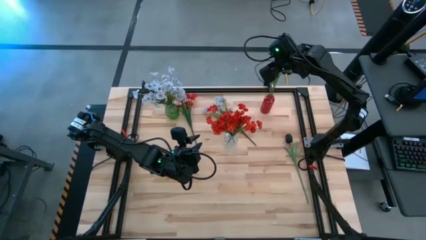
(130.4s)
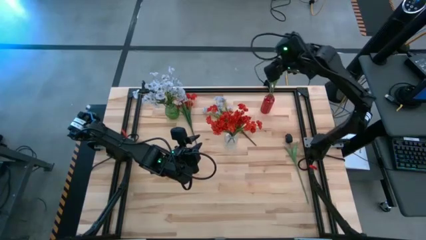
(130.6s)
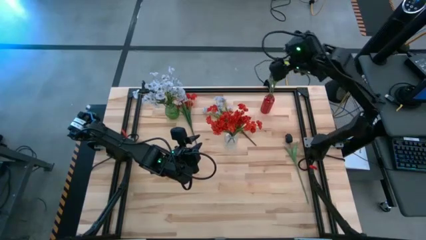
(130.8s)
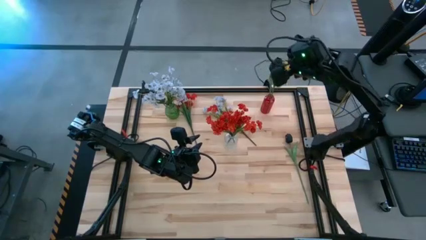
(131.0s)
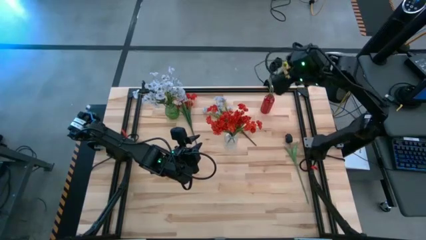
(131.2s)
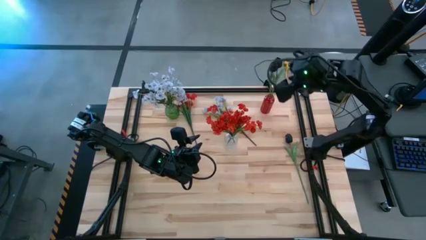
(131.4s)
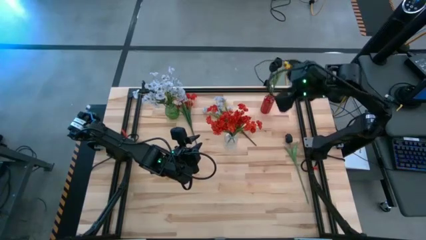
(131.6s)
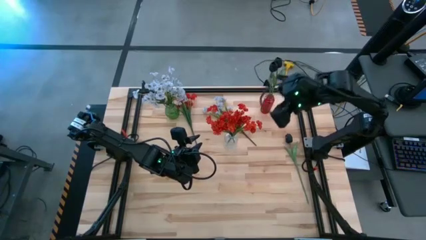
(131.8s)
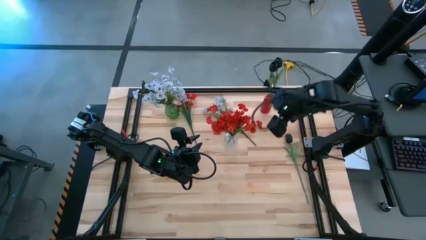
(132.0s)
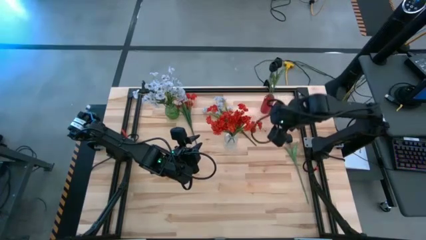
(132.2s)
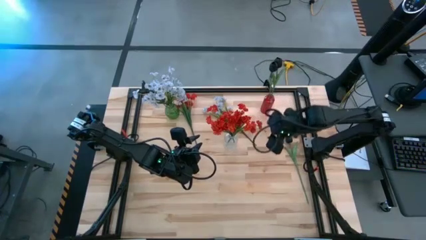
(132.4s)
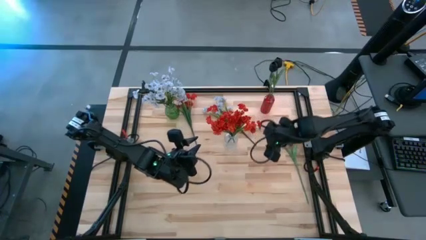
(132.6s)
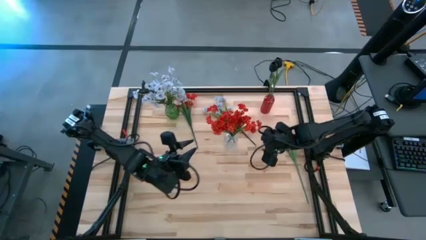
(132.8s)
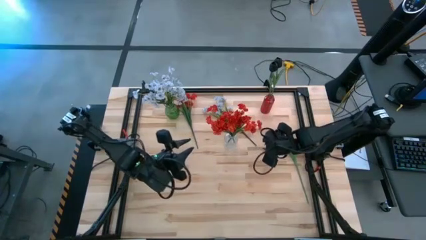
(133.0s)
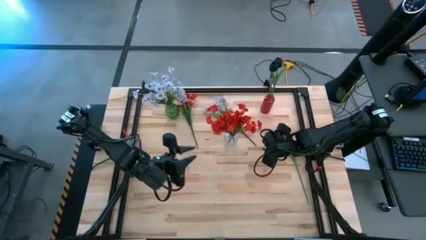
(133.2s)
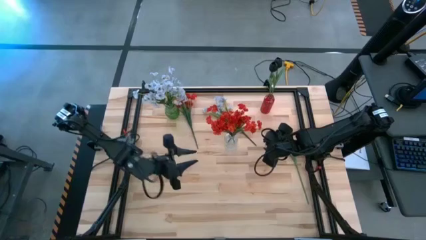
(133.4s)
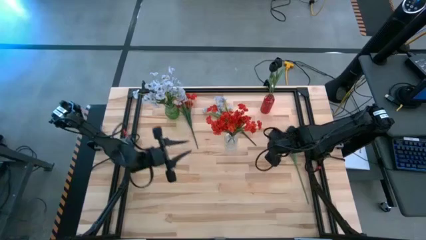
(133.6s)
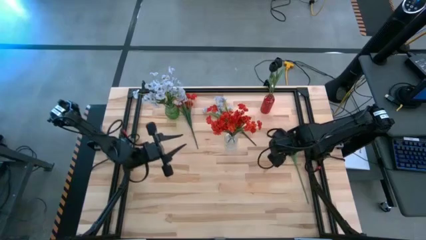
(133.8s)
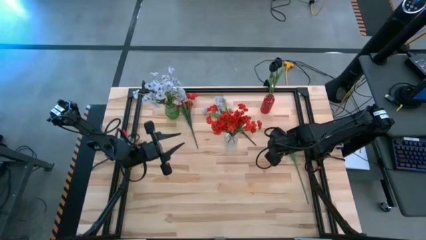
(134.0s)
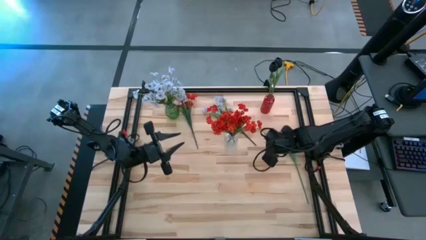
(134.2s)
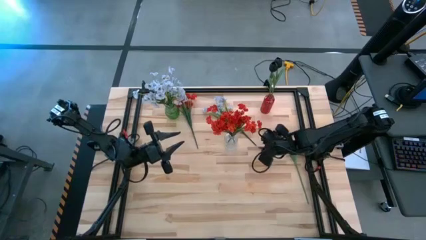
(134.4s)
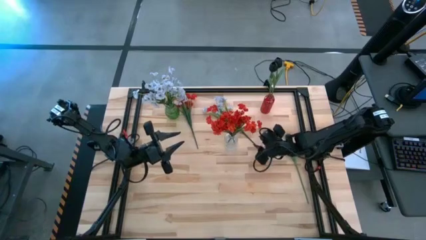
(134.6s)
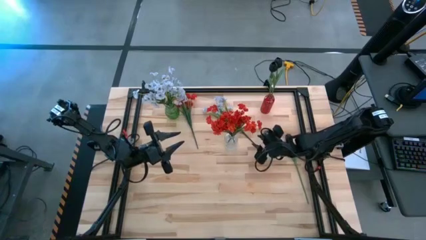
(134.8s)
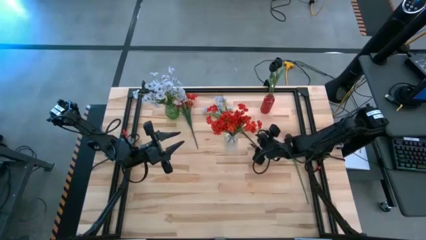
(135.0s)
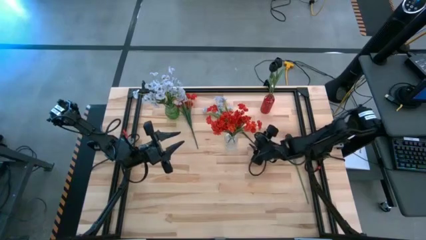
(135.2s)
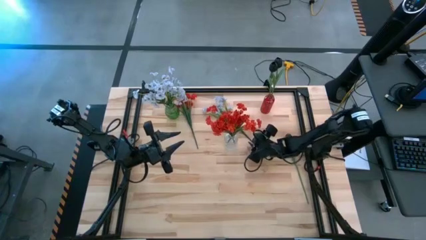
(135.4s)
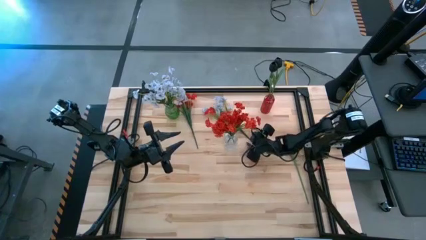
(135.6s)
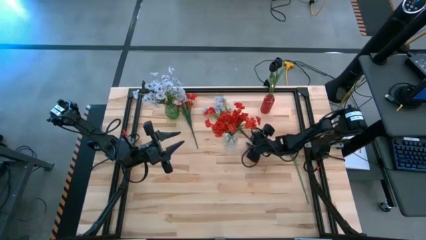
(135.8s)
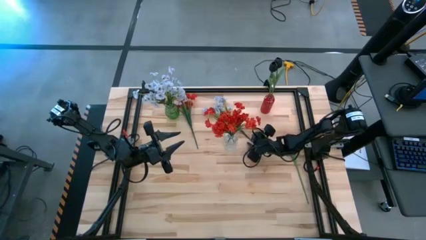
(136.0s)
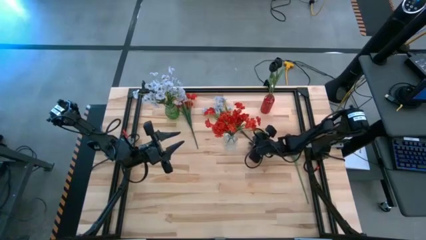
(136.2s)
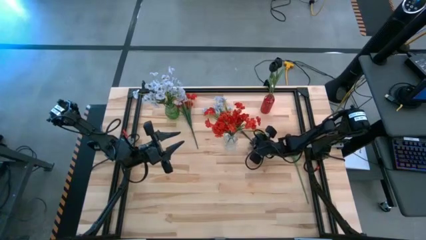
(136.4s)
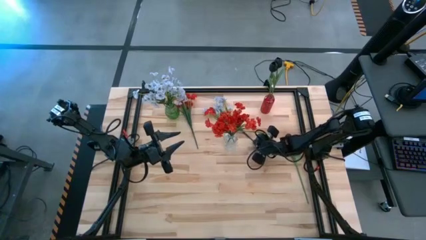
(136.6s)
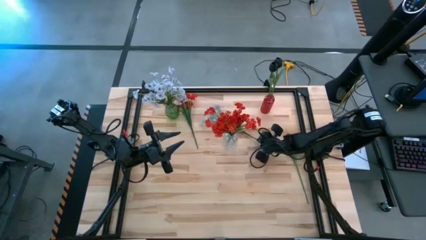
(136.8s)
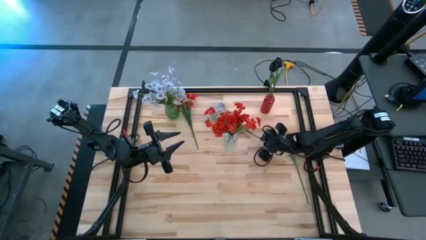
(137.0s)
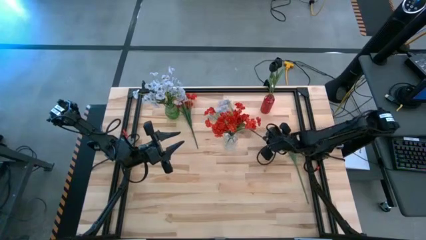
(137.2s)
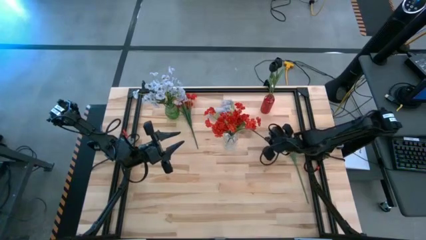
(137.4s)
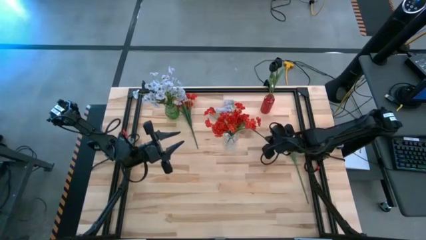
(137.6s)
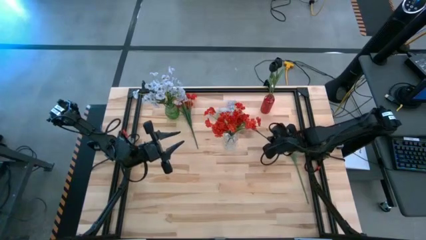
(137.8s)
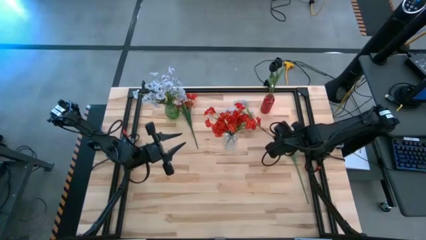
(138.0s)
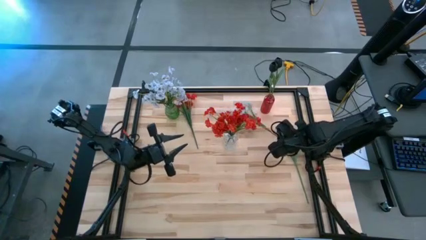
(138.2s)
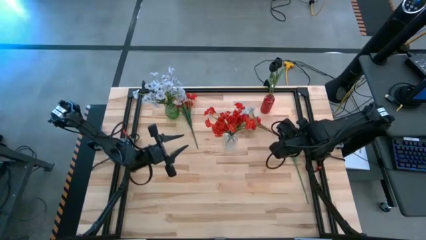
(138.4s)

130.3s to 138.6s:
Task: Sort flowers into vase by color
Put the white flower into the green vase

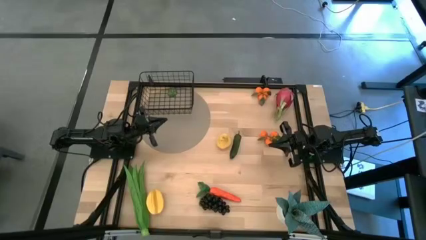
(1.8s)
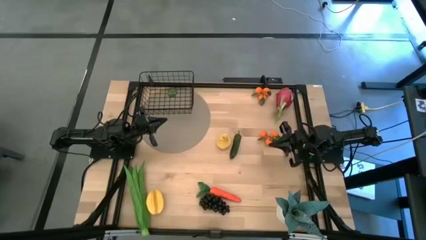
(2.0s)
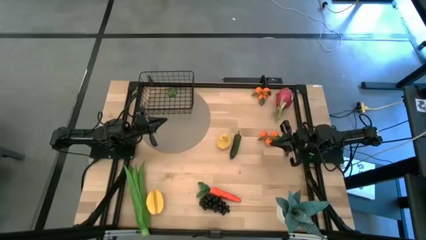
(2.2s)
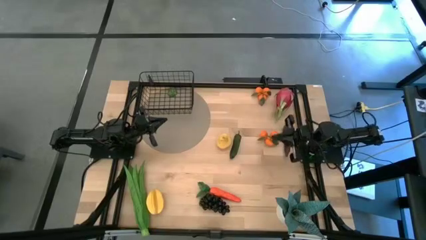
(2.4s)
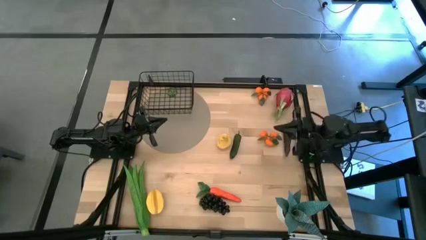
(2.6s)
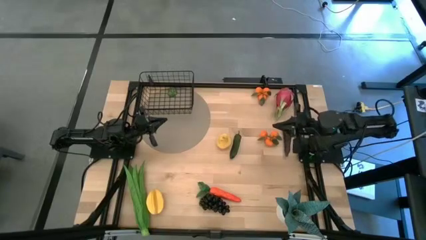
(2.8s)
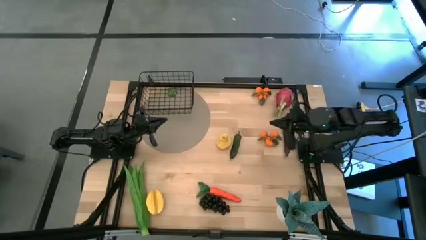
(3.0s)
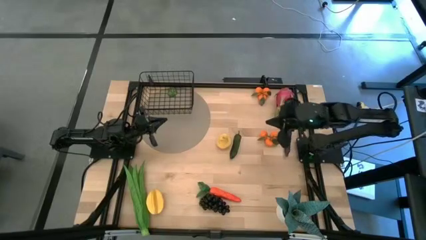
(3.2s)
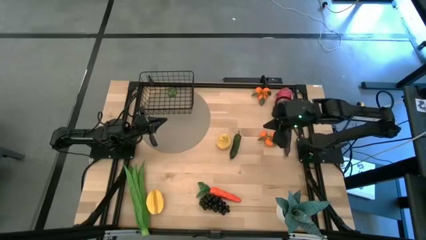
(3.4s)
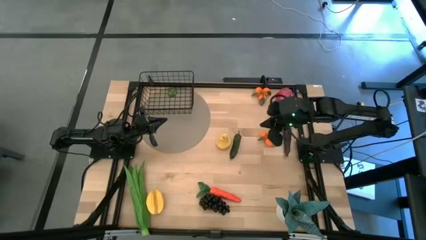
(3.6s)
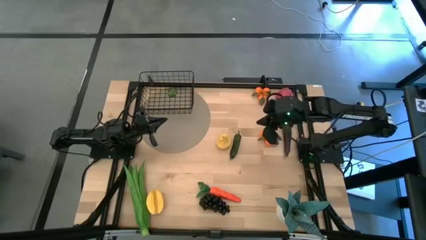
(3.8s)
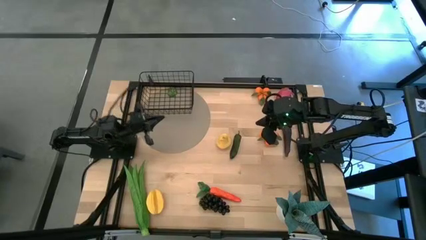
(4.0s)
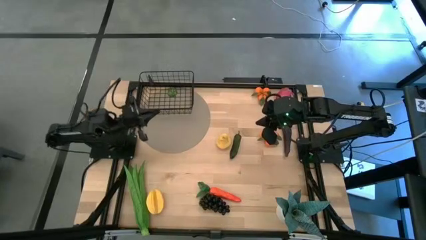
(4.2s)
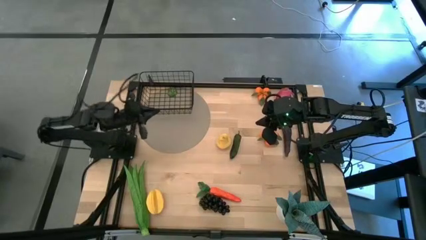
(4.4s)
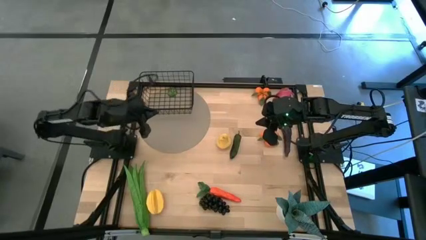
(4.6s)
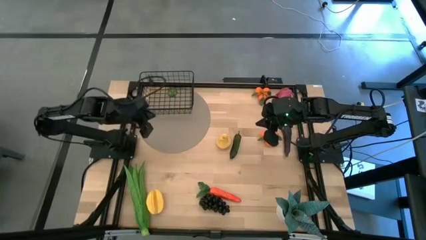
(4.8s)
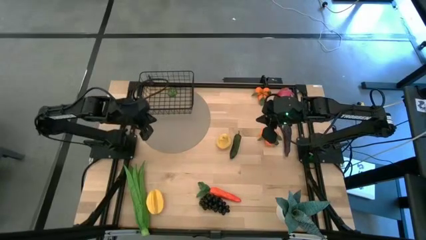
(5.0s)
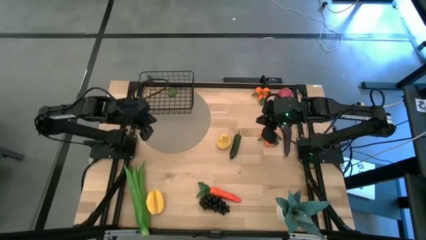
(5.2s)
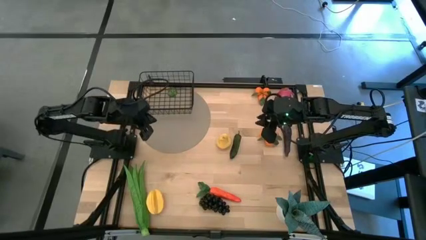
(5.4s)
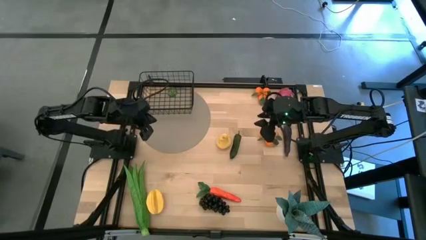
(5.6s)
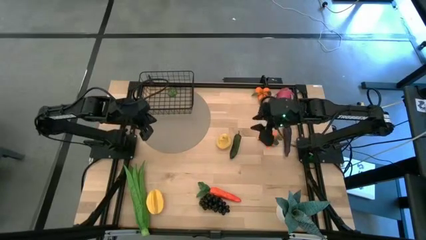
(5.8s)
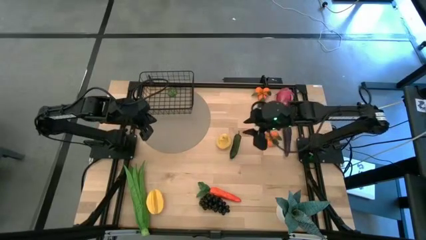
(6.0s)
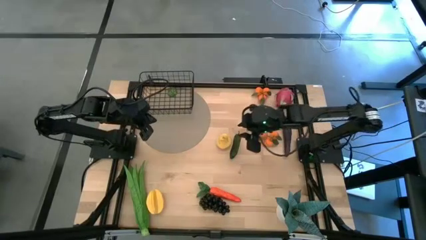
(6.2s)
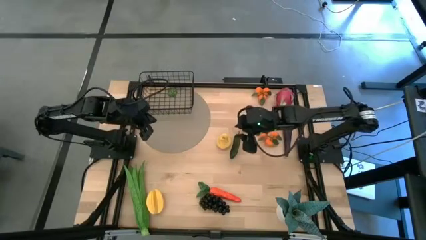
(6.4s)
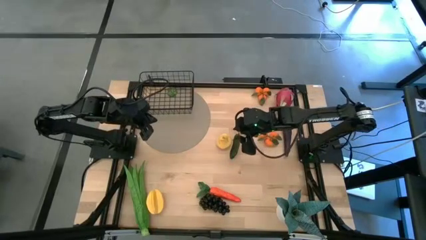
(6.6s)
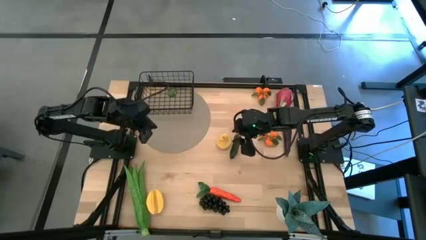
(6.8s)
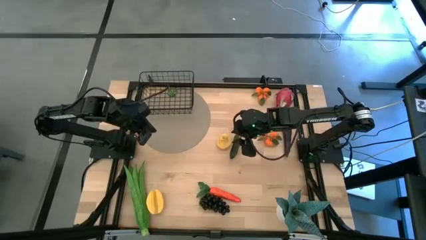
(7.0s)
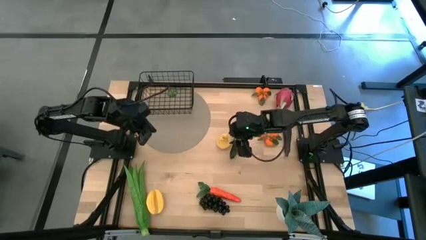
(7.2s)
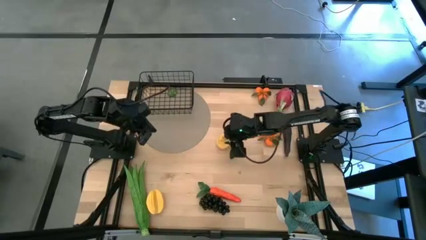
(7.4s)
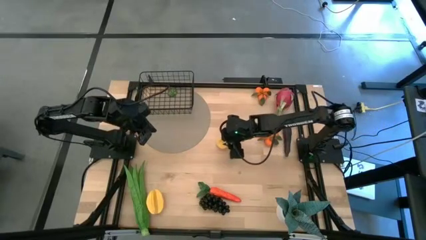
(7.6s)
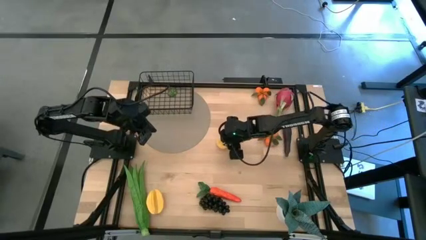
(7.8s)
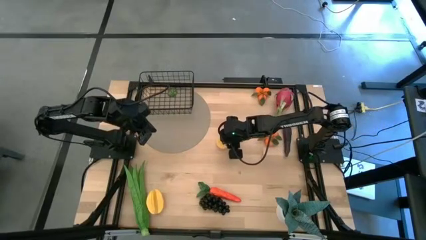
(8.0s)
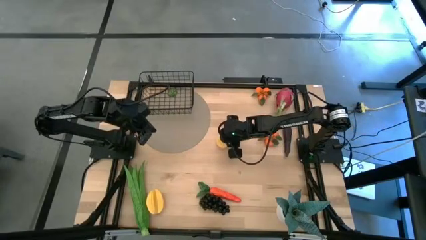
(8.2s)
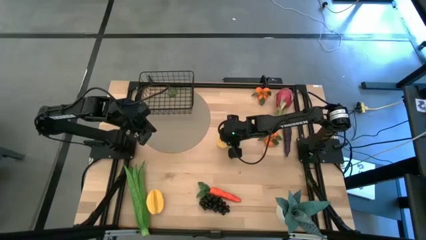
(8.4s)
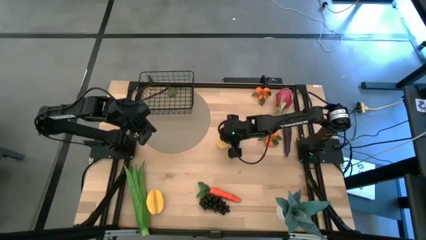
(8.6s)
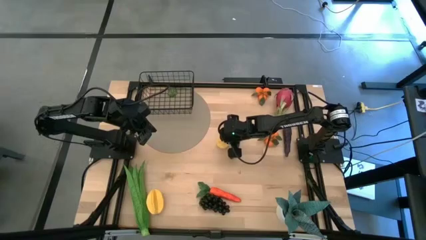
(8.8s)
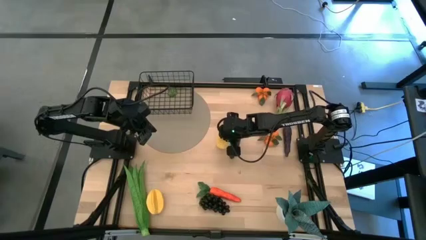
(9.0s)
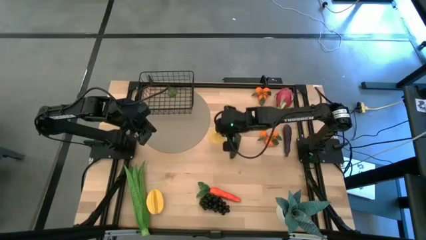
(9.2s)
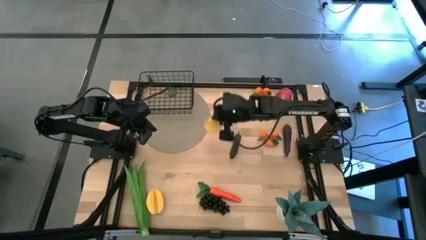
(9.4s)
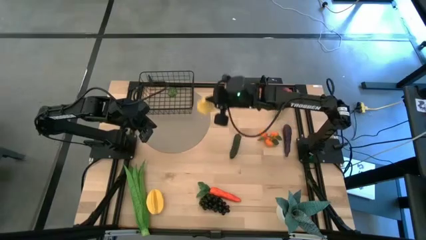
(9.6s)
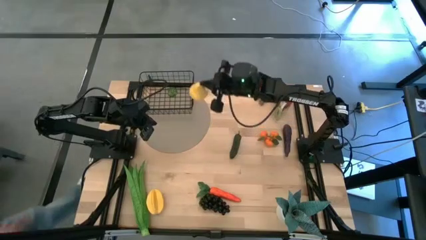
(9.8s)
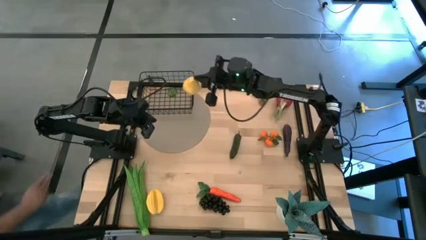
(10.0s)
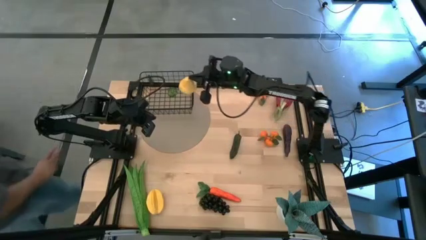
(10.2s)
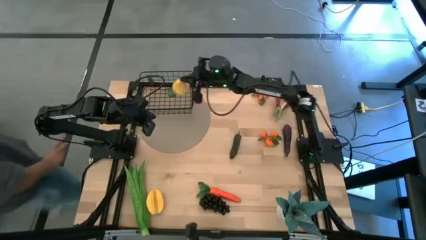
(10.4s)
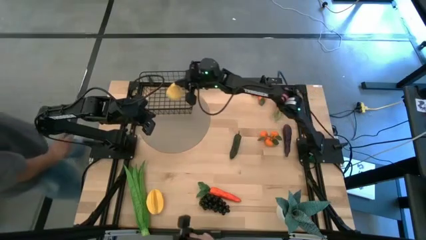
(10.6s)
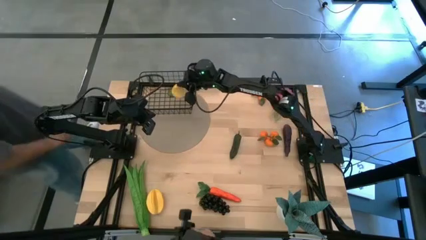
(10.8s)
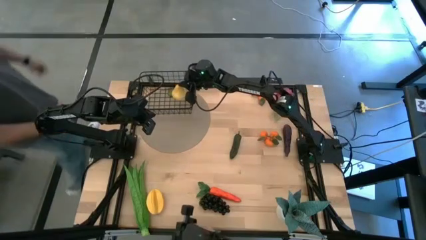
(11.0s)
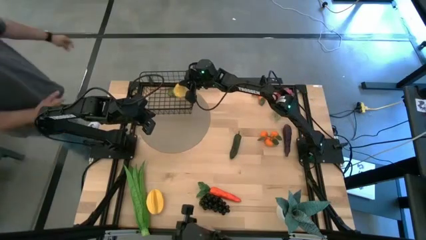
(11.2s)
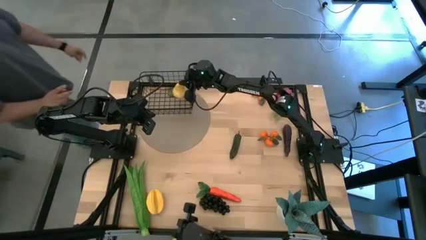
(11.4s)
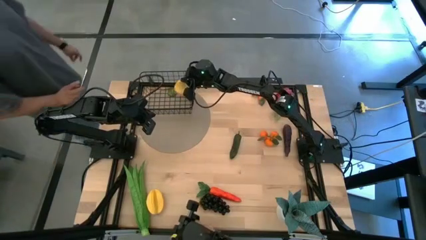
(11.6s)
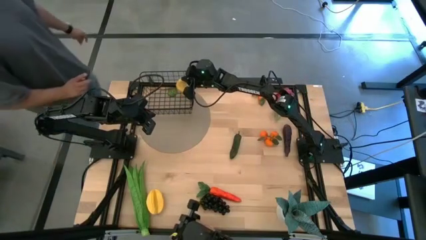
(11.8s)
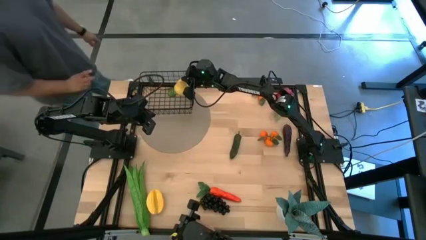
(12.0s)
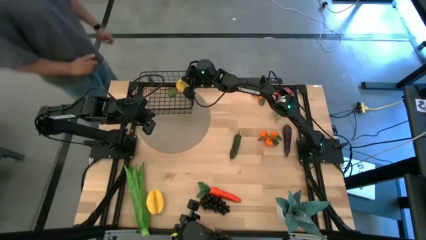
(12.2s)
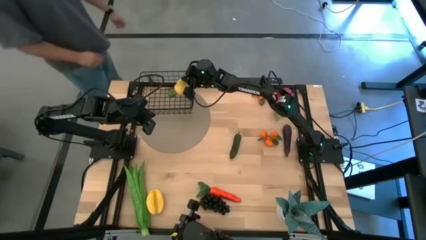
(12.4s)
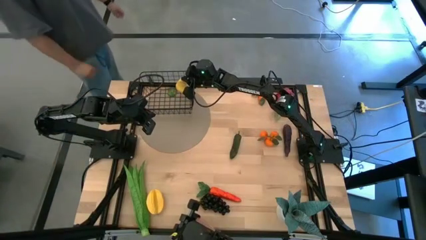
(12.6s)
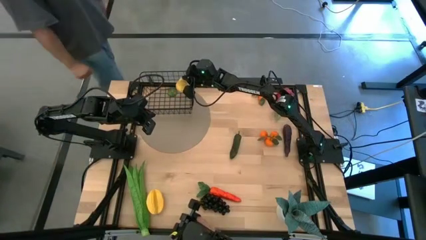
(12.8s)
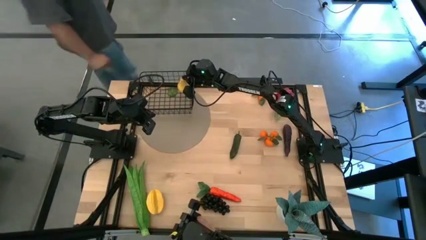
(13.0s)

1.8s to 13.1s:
Task: Build produce basket
Put the yellow pear into the wire basket
